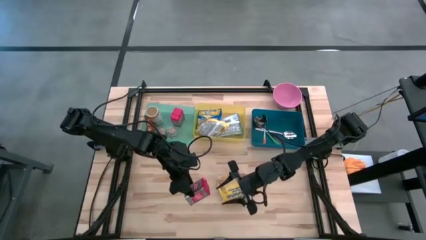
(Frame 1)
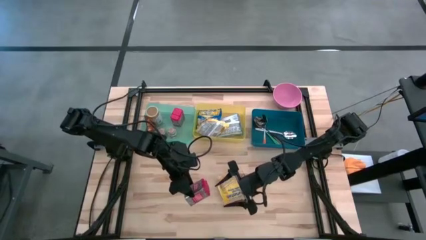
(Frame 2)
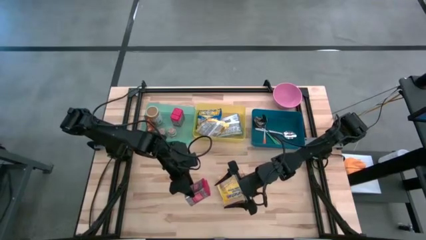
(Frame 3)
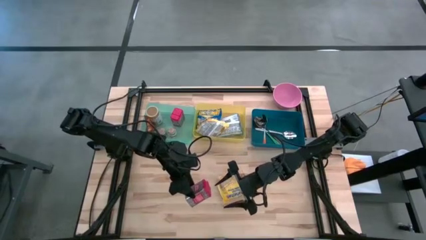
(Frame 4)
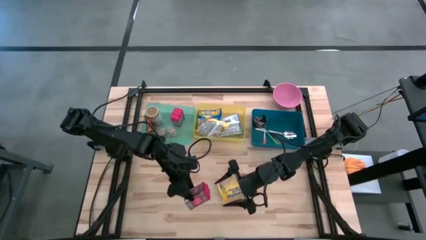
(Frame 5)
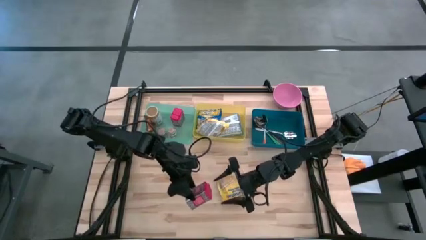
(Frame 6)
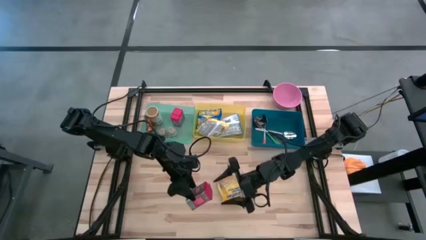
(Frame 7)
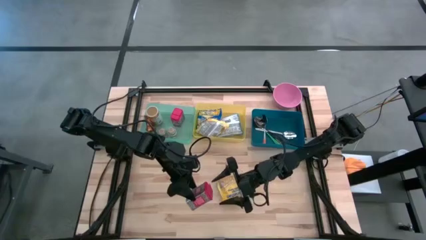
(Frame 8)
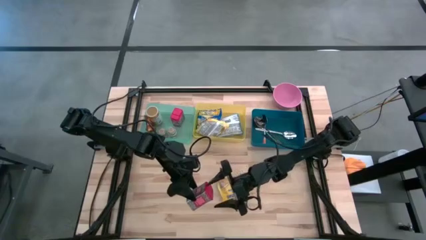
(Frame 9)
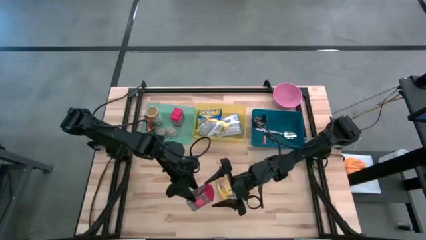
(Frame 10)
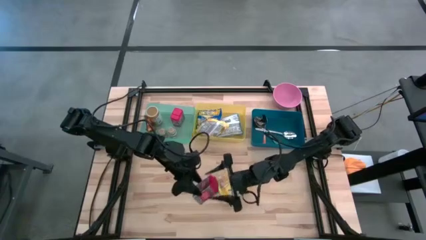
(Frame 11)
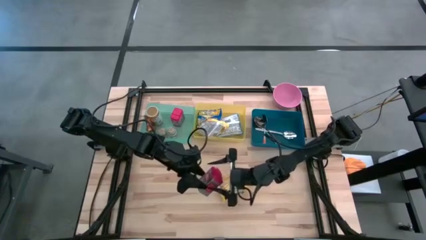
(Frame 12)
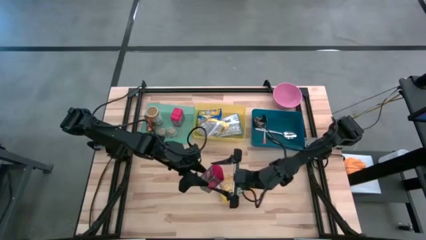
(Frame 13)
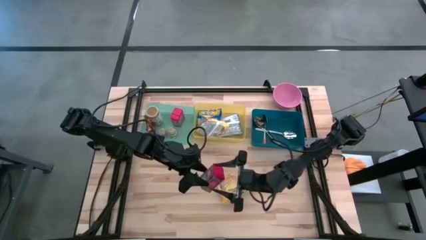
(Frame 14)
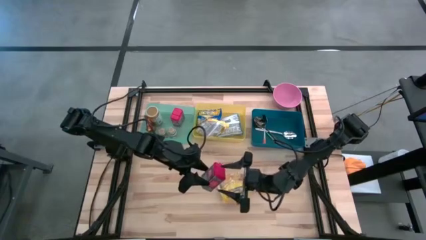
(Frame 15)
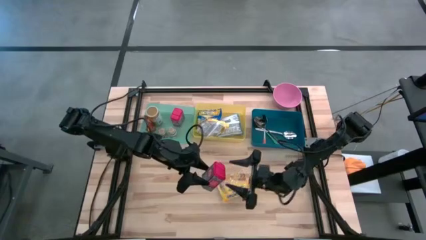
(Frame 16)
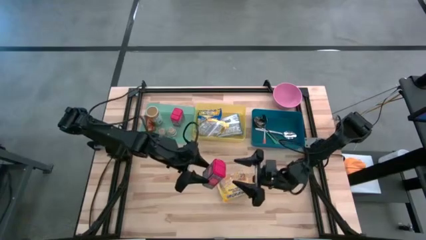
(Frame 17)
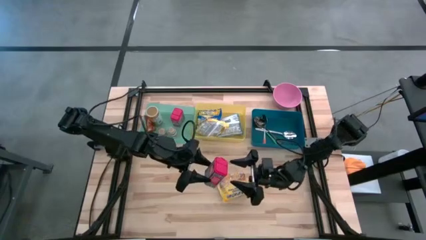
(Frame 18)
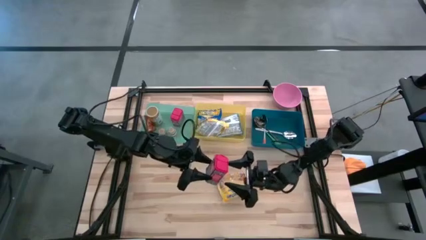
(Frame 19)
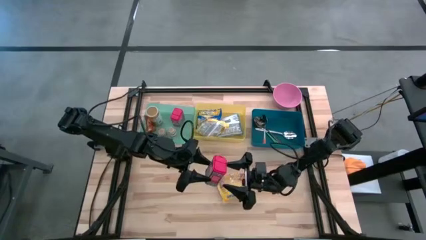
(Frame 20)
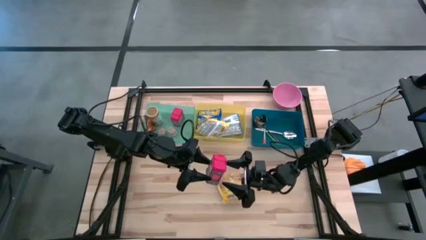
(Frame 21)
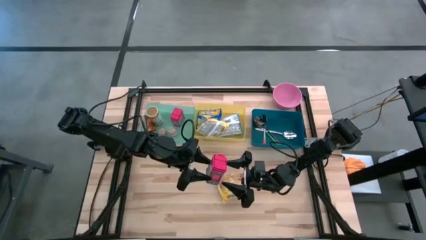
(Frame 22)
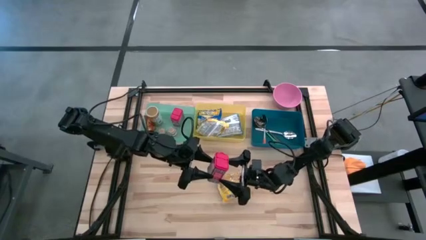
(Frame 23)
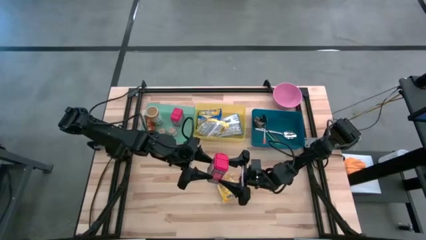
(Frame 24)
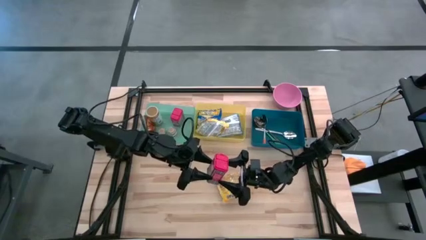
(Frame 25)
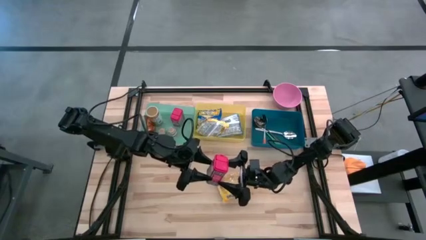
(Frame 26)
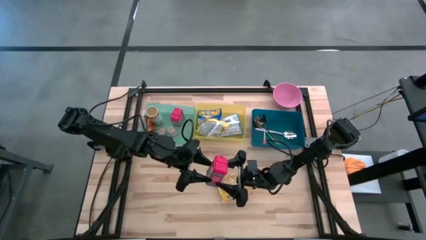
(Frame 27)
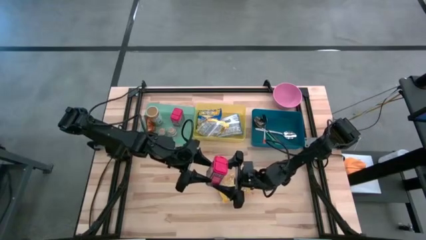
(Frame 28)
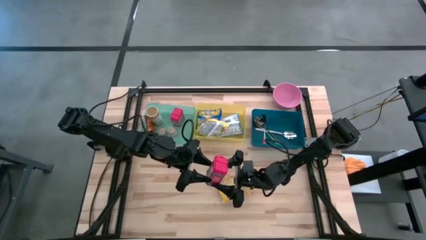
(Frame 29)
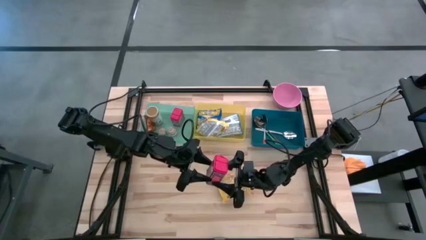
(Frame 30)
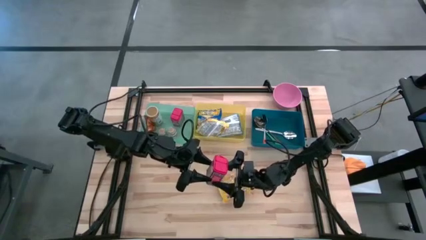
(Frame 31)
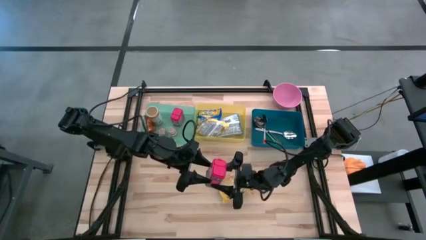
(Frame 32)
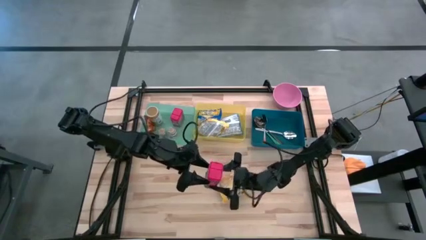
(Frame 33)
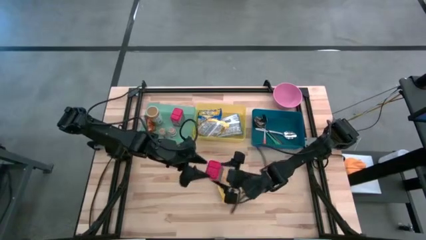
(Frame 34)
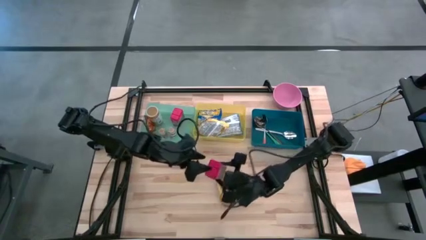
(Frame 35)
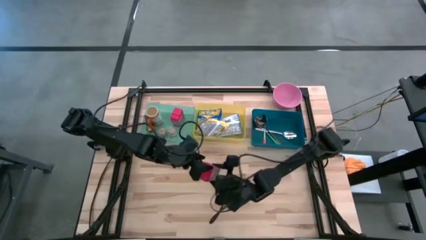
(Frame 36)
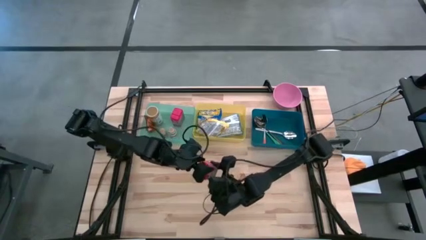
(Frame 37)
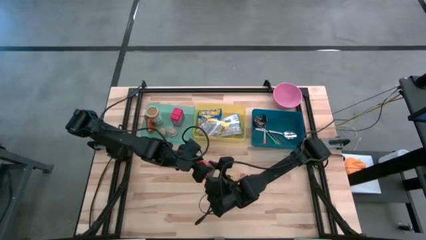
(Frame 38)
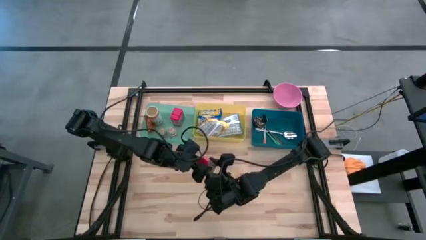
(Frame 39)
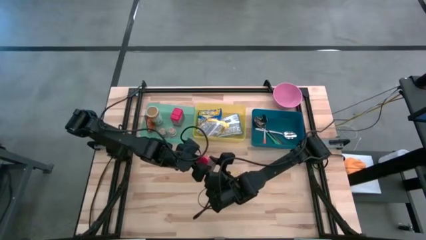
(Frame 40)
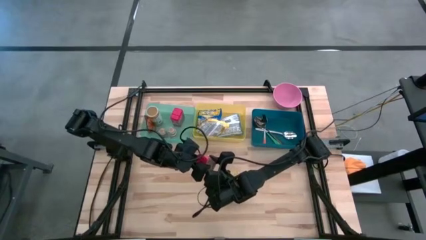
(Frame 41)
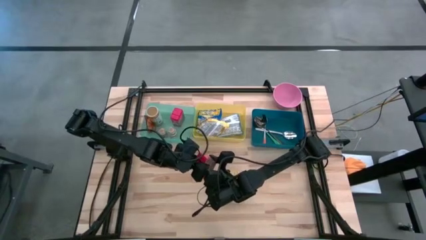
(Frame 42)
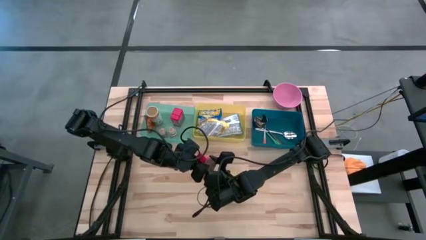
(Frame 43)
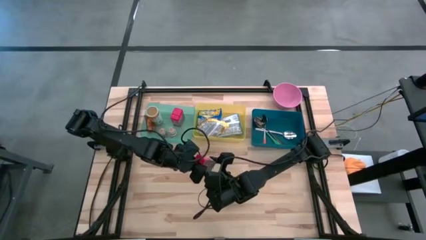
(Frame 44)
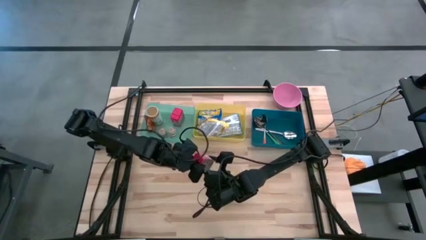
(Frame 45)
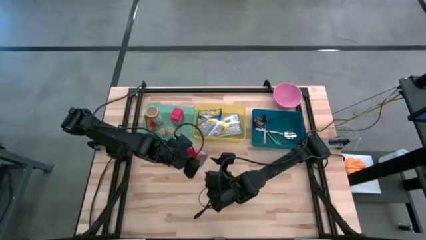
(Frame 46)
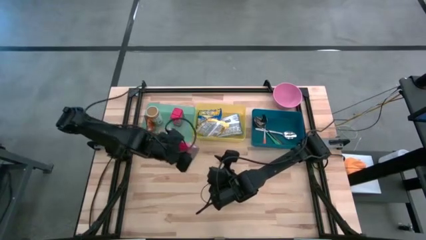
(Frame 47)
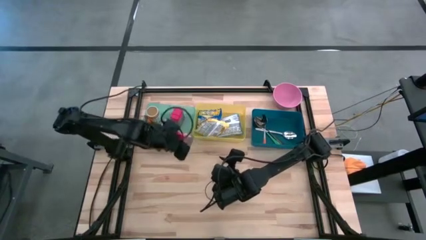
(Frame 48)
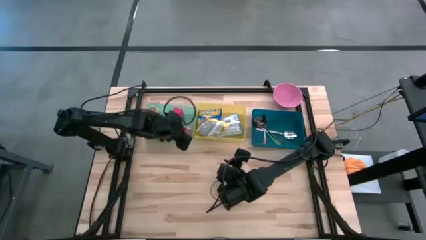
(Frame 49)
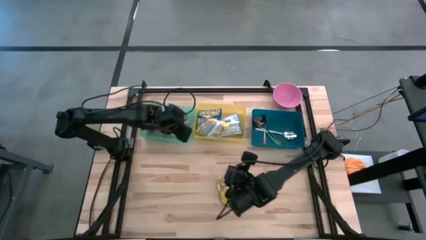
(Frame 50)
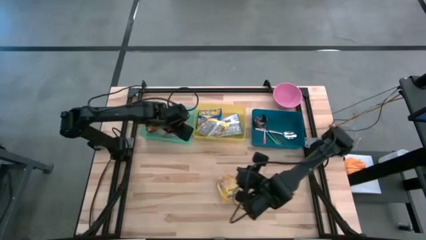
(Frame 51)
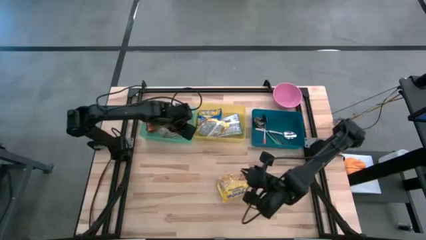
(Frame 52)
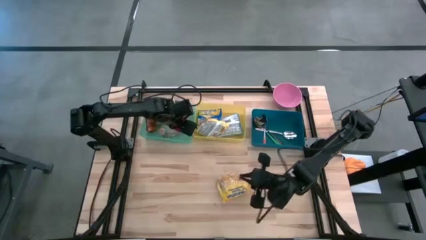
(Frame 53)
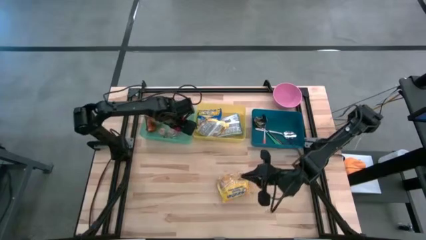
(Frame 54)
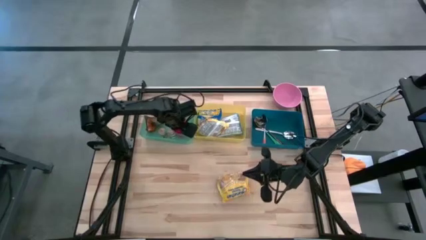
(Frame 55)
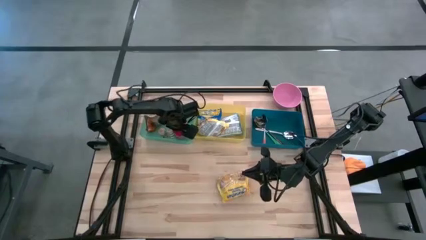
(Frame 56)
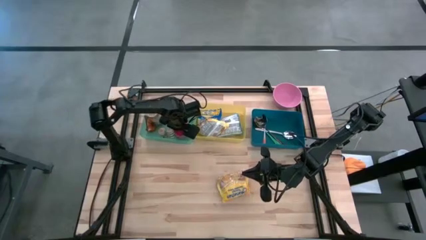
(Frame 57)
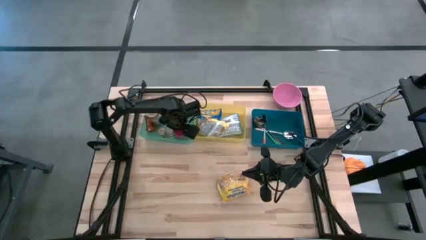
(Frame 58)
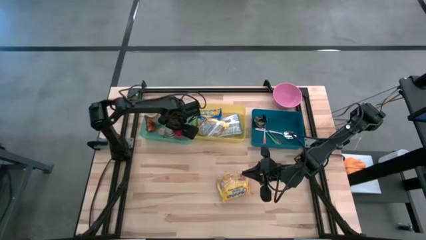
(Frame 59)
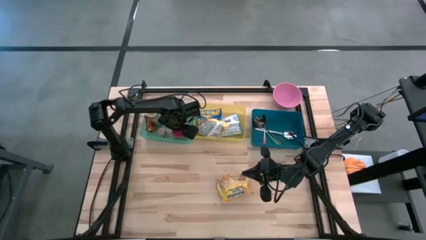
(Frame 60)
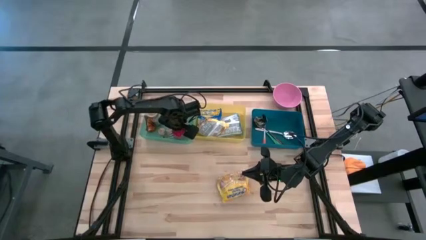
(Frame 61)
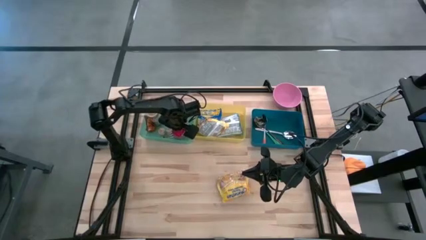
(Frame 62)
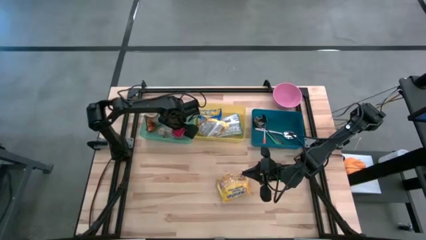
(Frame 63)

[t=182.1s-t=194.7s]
Put the red seasoning can into the green bin
